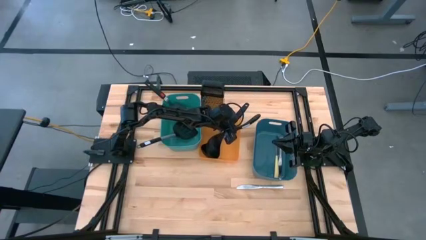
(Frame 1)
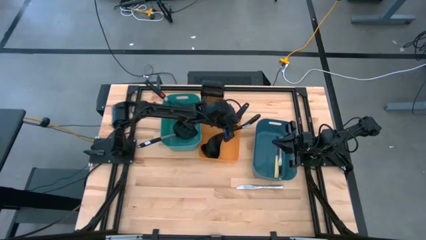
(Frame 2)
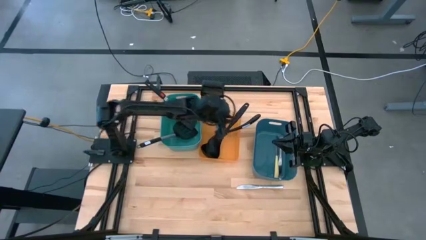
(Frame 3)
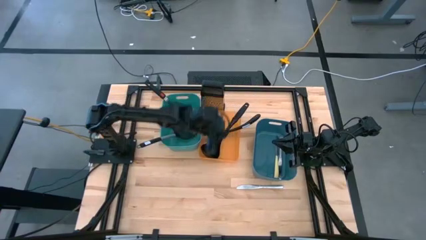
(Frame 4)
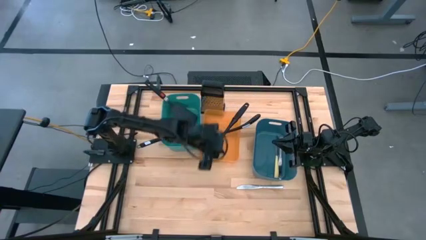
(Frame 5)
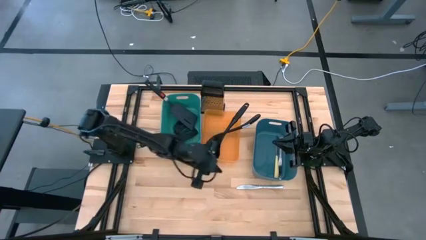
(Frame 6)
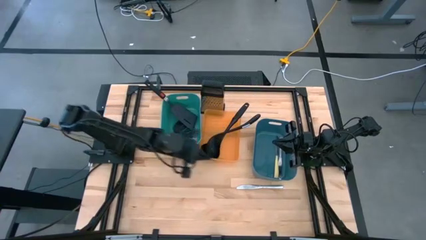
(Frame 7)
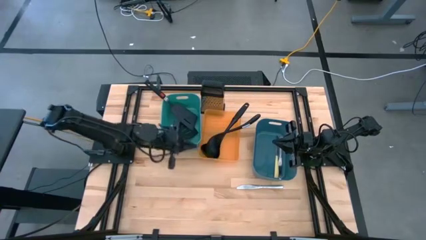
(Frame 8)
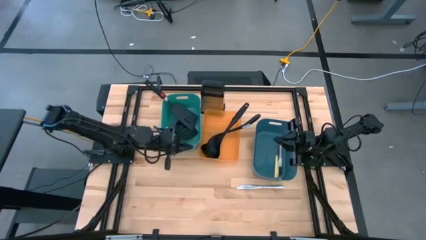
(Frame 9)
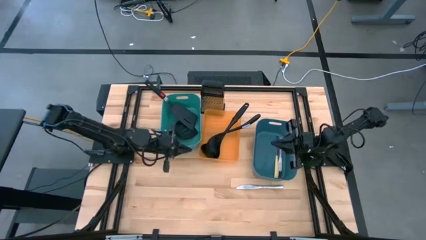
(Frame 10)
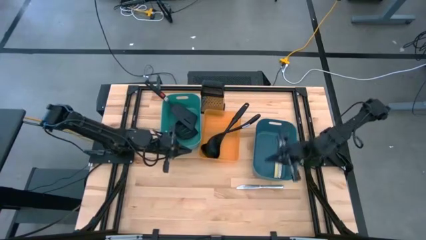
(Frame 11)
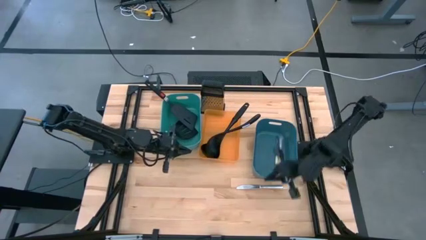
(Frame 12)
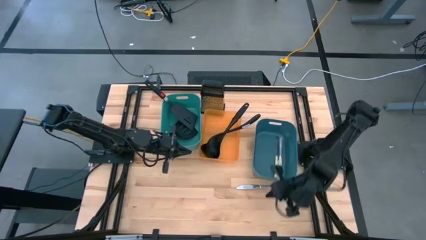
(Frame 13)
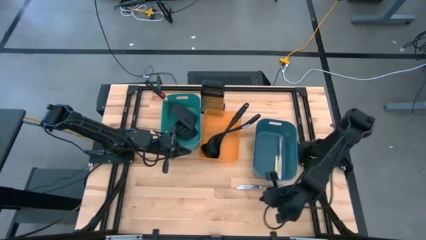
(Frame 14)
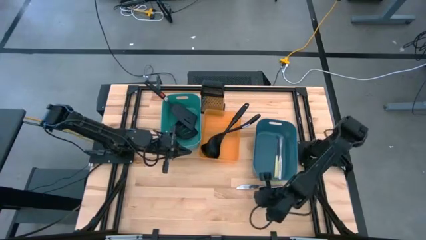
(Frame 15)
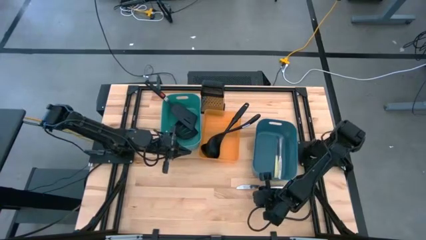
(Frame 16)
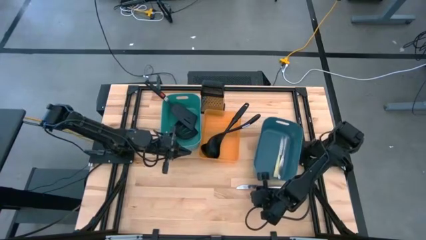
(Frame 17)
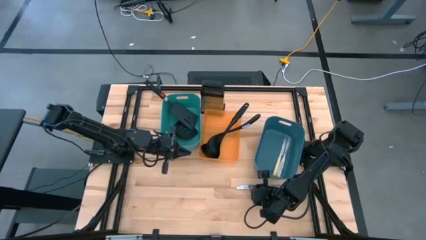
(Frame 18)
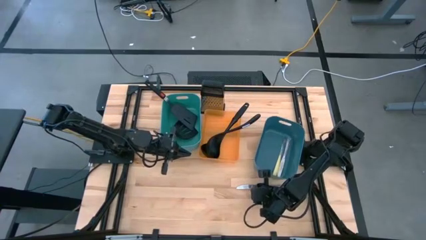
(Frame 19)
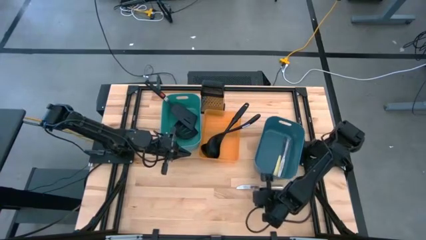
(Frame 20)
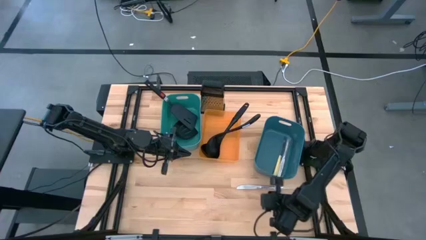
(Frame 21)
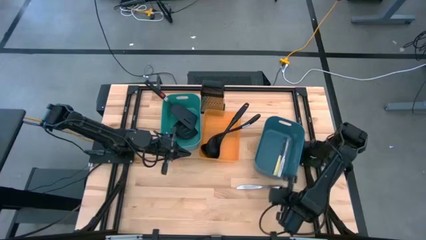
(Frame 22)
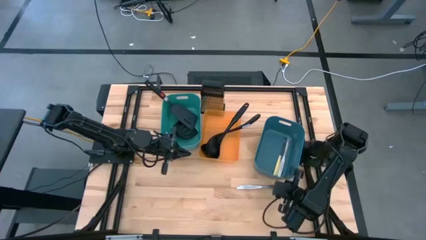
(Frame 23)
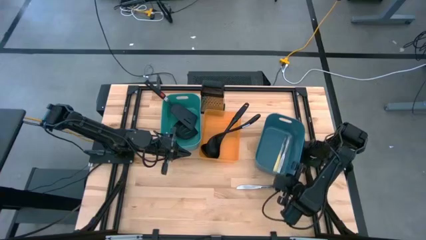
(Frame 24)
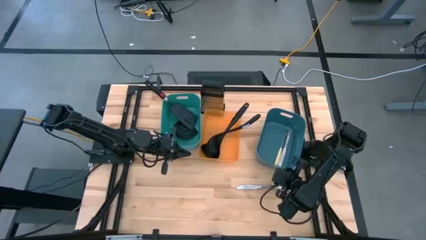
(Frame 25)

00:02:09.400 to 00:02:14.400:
Task: Pick & Place Kitchen Items
Adjust the blue bin

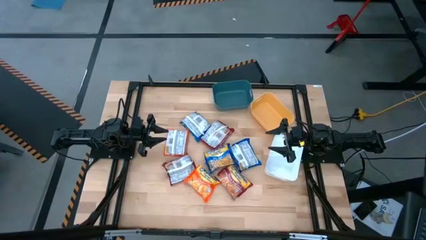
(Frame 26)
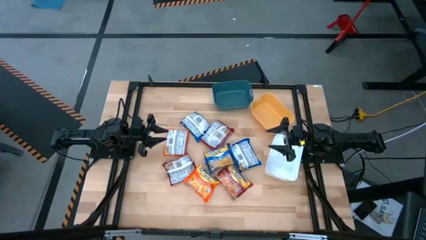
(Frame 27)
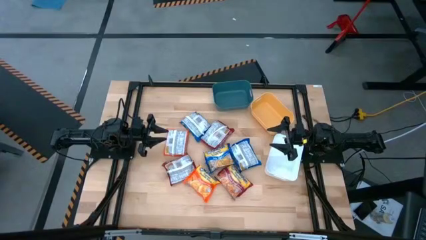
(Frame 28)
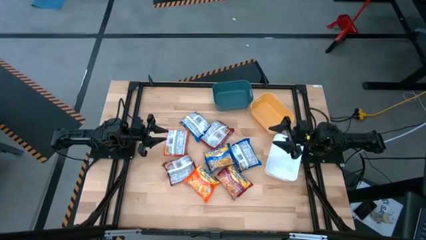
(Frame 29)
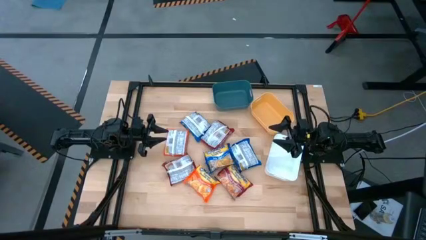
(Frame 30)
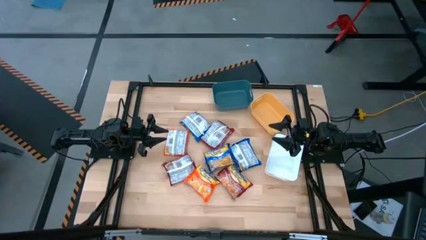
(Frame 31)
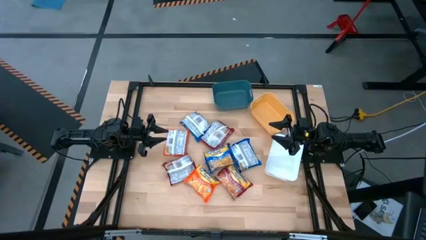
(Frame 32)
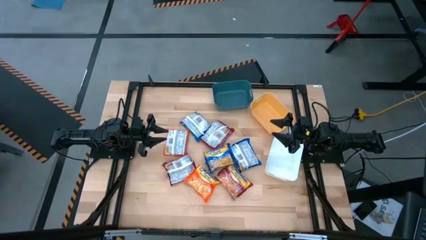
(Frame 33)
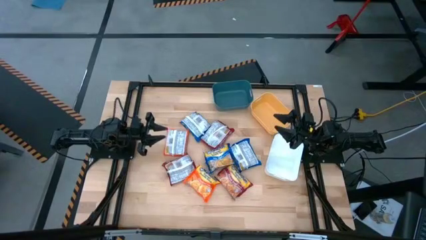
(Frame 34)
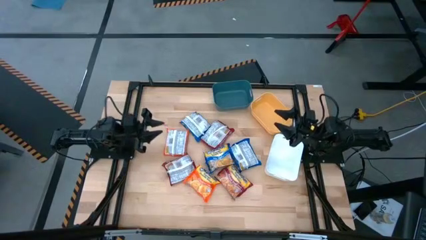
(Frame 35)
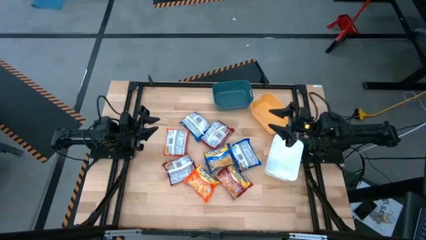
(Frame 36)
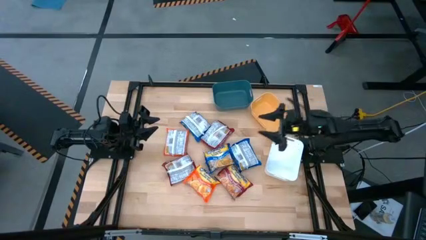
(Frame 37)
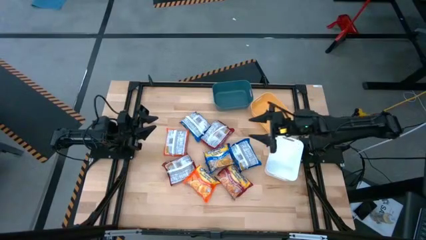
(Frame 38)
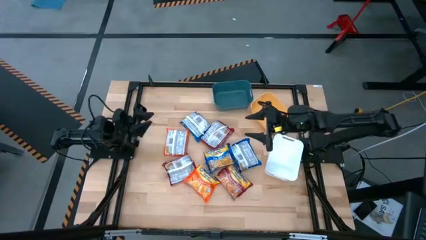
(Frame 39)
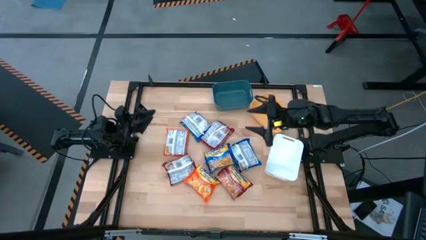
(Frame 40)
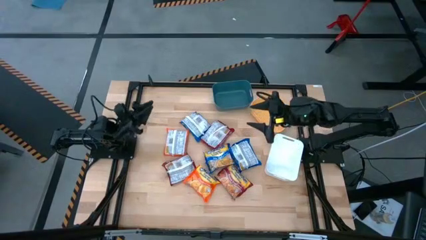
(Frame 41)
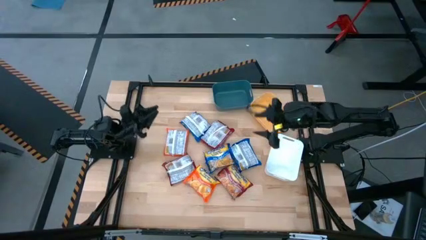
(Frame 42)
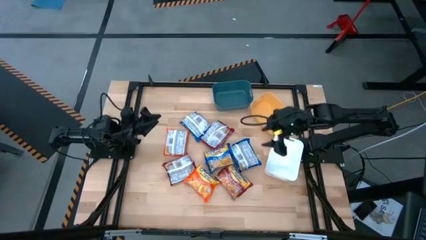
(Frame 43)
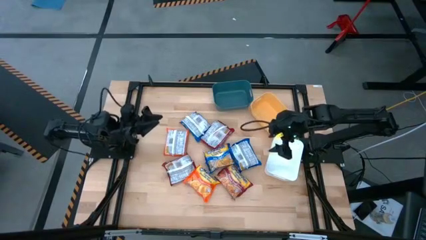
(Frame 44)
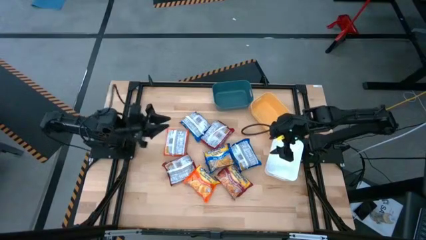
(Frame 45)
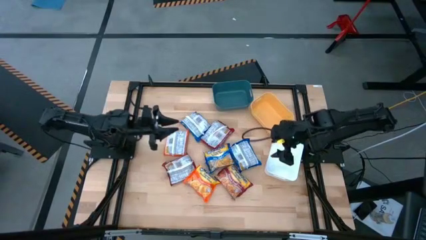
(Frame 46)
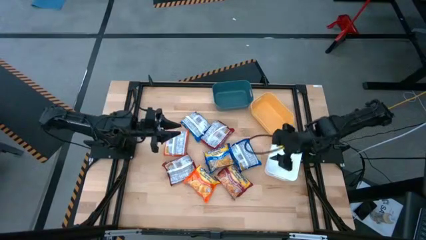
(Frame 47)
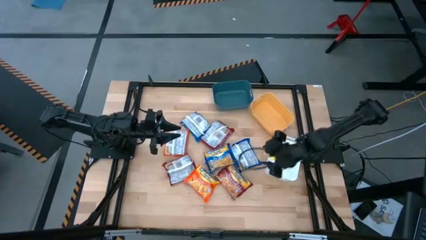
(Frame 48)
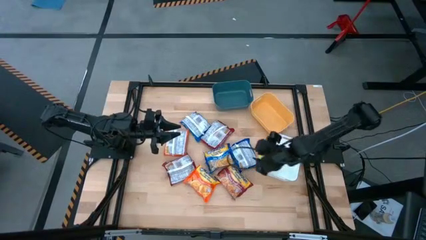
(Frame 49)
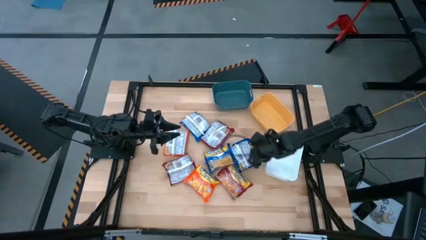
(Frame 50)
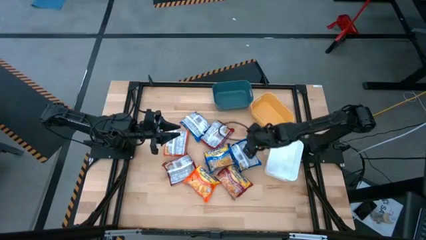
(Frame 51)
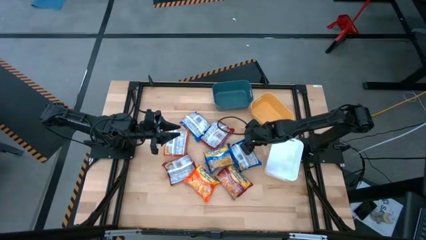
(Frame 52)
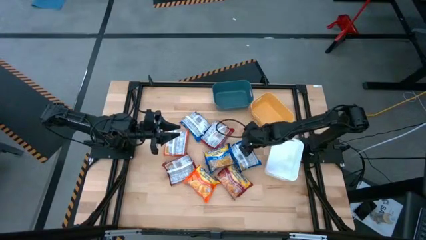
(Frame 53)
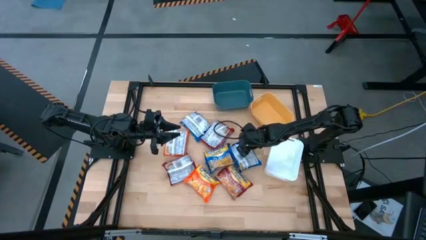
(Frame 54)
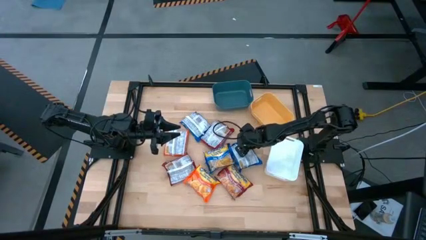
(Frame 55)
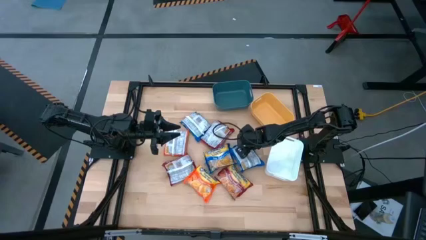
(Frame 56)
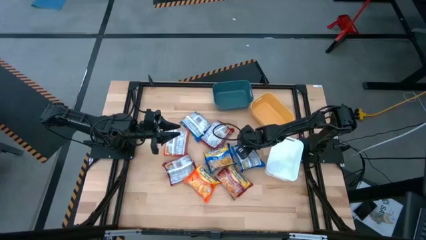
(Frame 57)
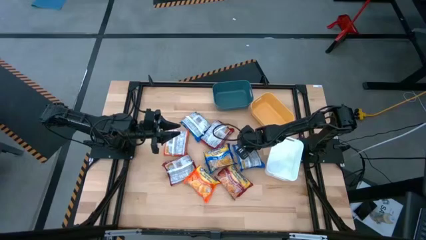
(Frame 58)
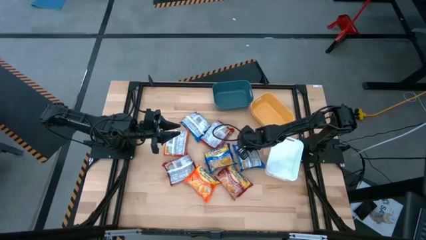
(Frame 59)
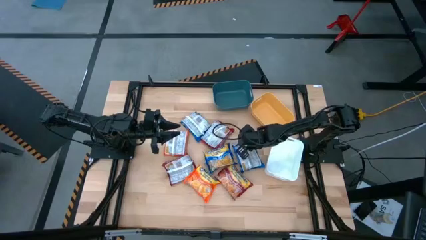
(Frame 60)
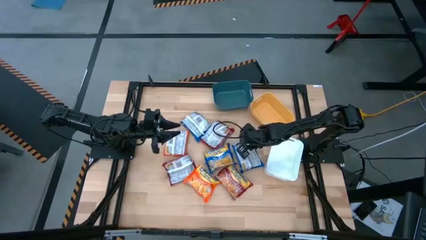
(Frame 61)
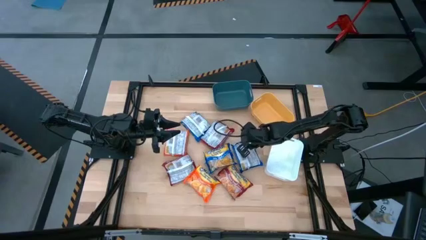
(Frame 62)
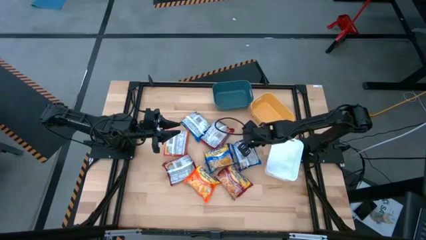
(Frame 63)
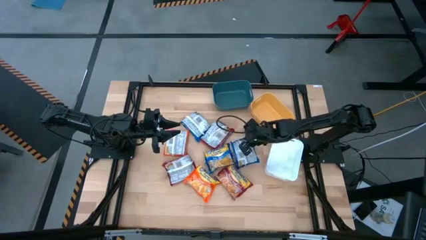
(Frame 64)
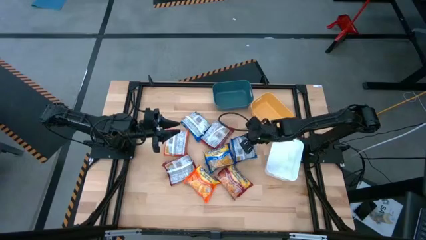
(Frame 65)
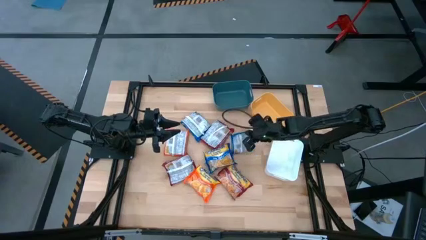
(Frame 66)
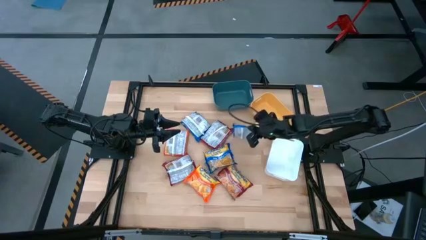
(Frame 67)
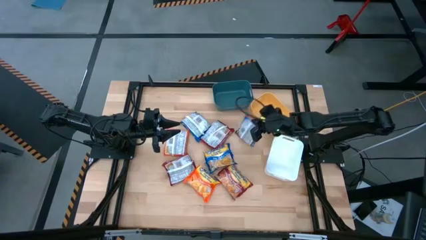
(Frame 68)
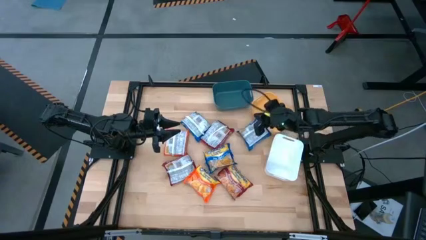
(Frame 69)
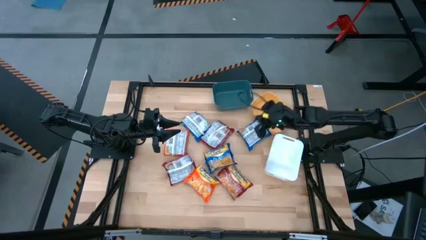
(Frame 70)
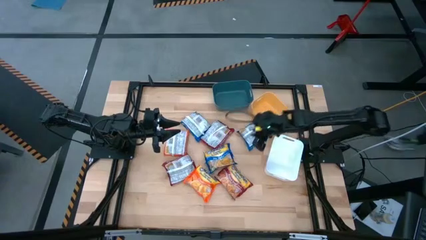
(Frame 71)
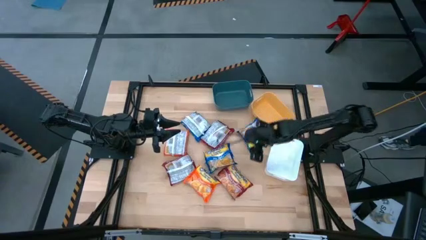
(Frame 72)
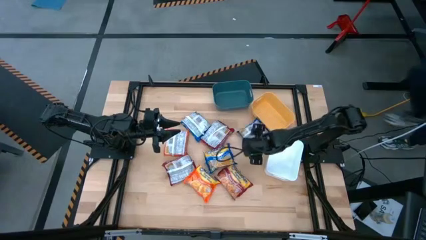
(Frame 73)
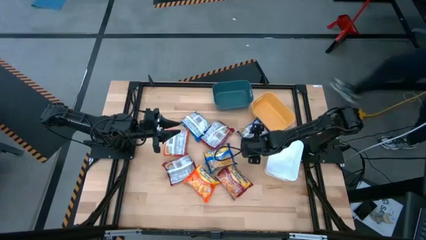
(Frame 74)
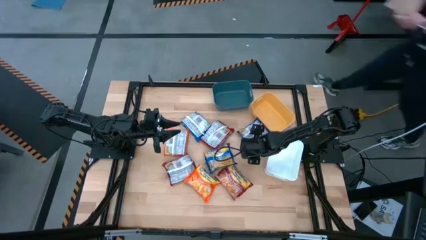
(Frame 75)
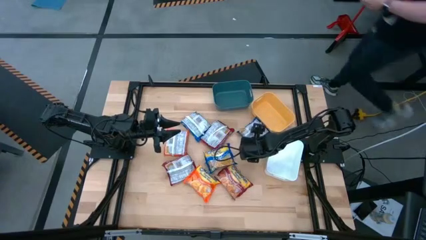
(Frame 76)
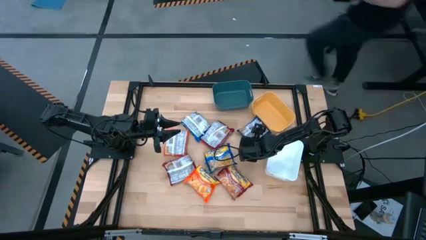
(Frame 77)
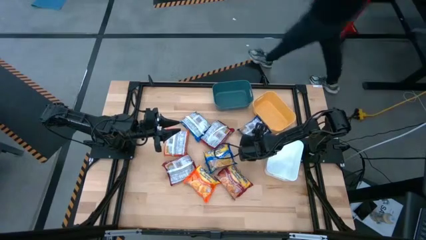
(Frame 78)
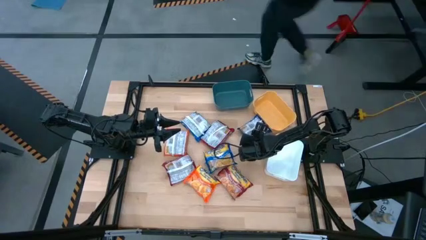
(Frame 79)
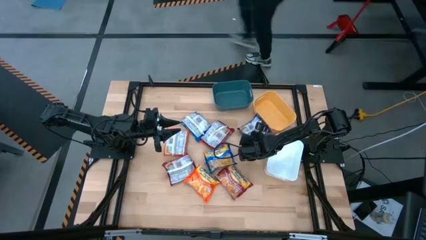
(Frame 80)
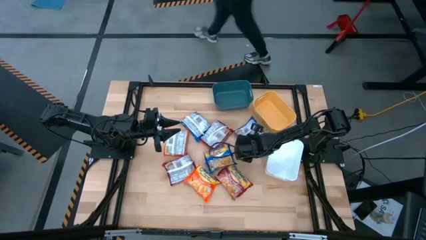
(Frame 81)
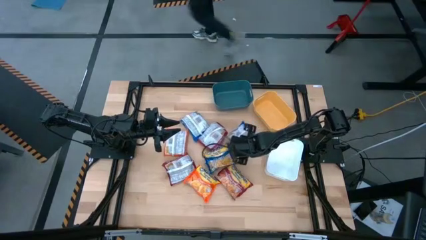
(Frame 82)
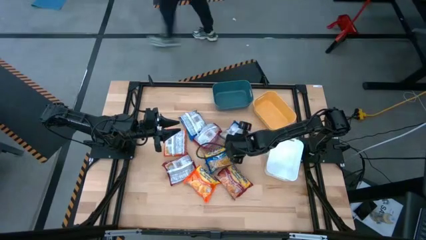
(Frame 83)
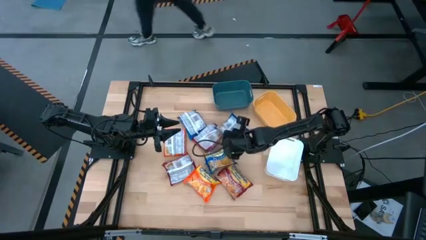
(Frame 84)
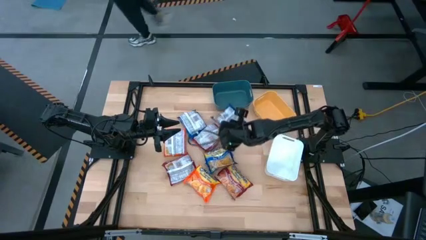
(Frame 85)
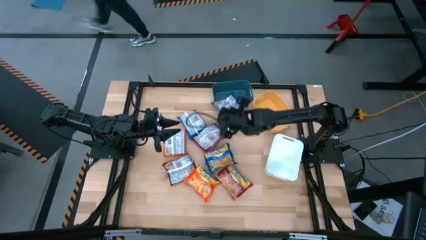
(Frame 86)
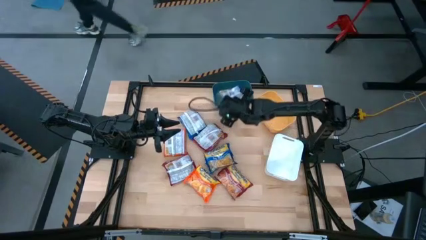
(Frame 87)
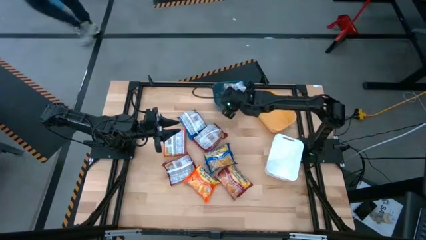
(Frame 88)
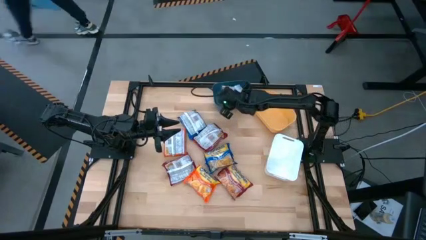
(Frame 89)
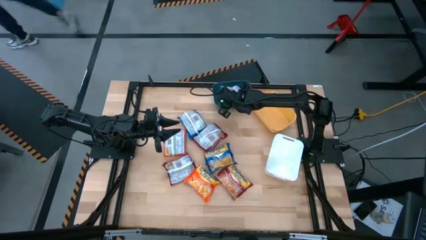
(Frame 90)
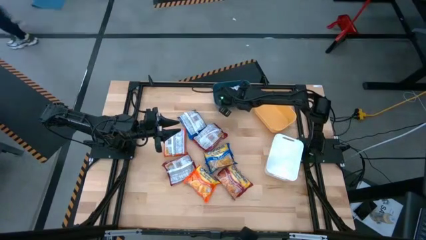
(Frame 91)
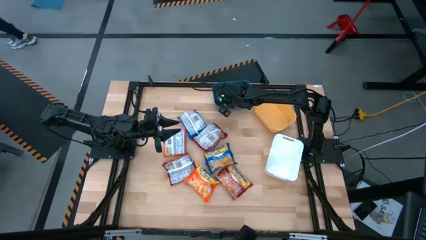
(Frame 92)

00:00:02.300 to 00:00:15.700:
Task: Sort Maruchan noodles
Put the right blue noodle pack into the blue bin
